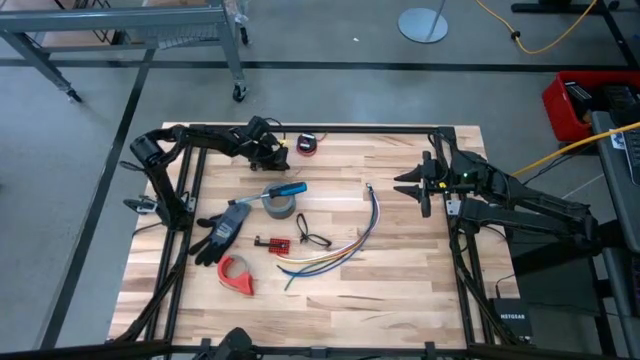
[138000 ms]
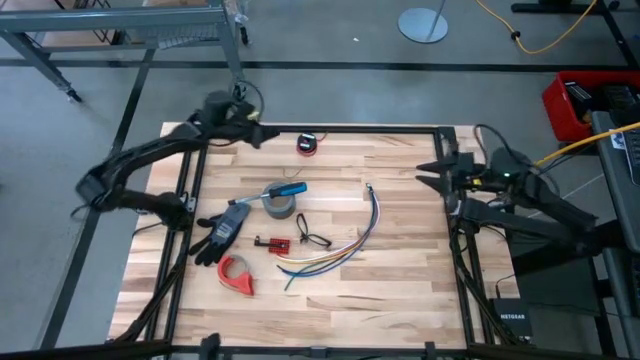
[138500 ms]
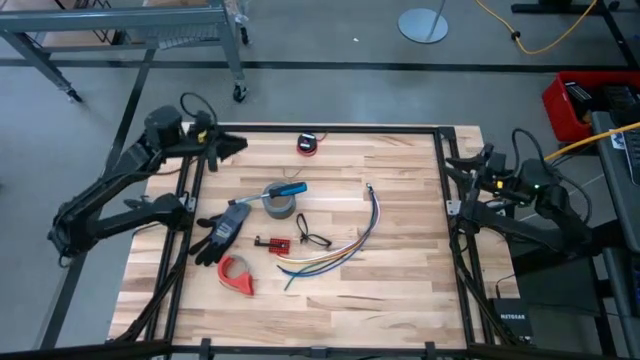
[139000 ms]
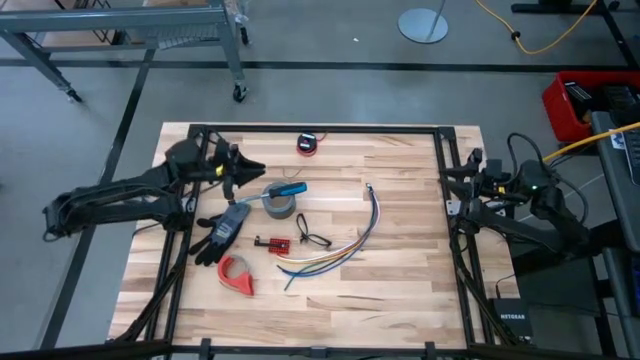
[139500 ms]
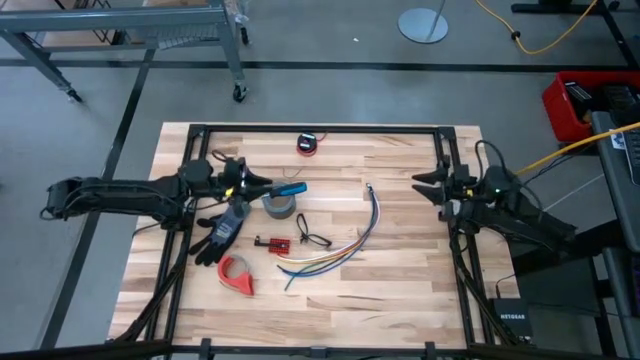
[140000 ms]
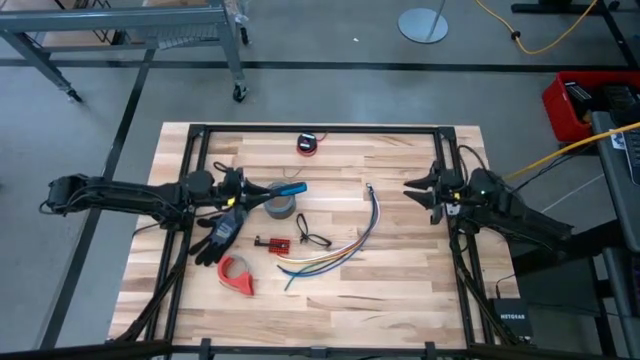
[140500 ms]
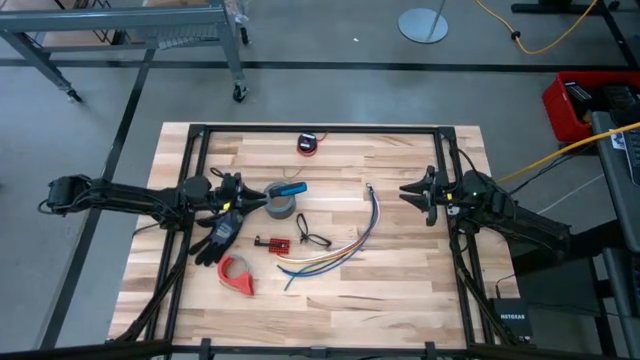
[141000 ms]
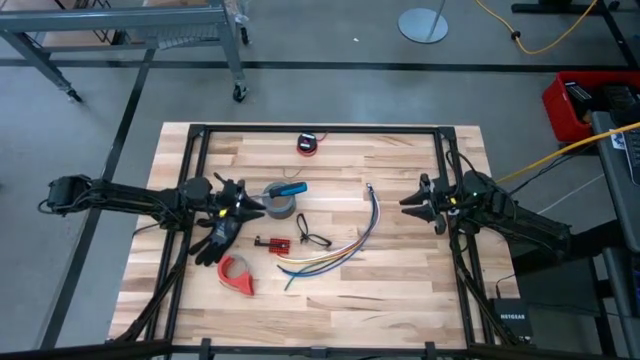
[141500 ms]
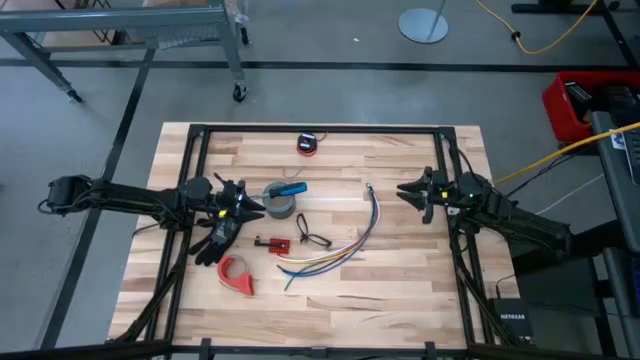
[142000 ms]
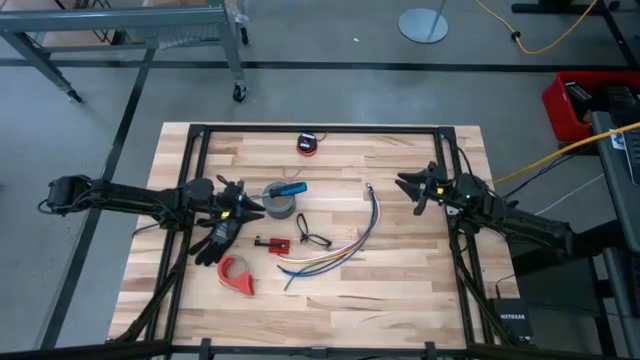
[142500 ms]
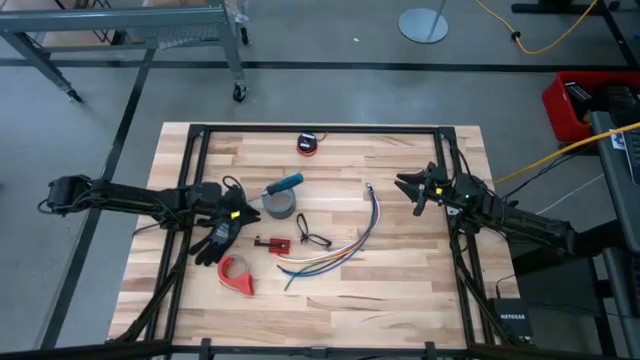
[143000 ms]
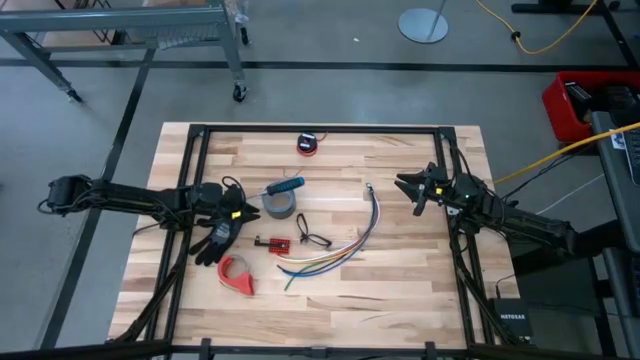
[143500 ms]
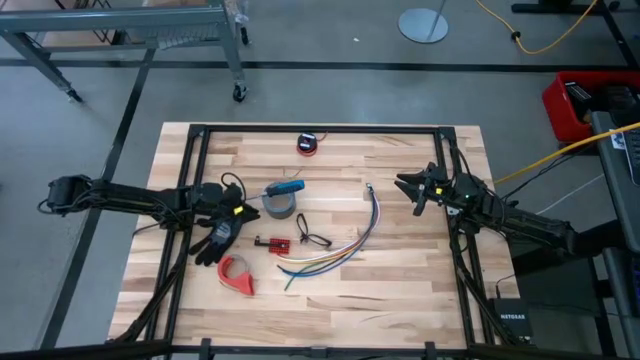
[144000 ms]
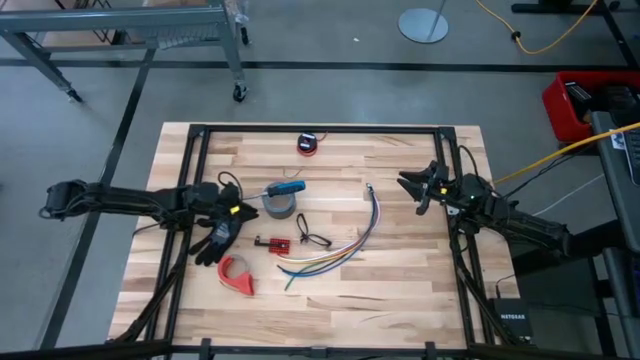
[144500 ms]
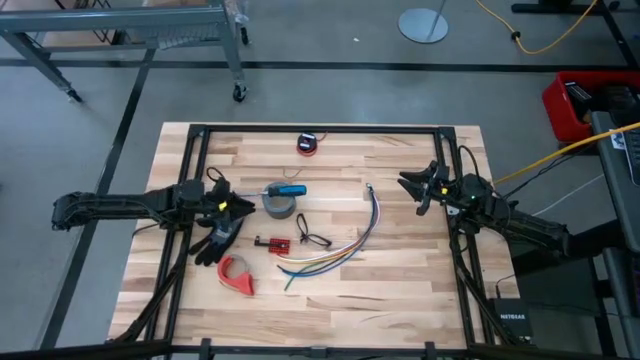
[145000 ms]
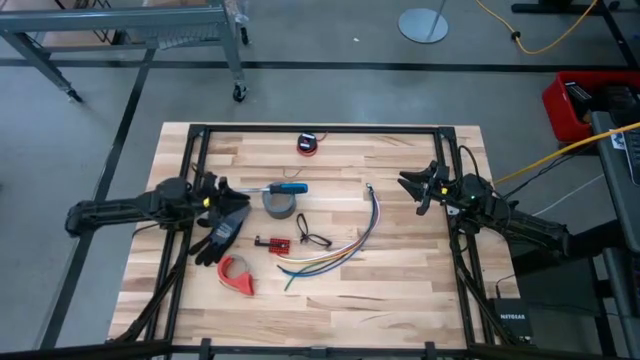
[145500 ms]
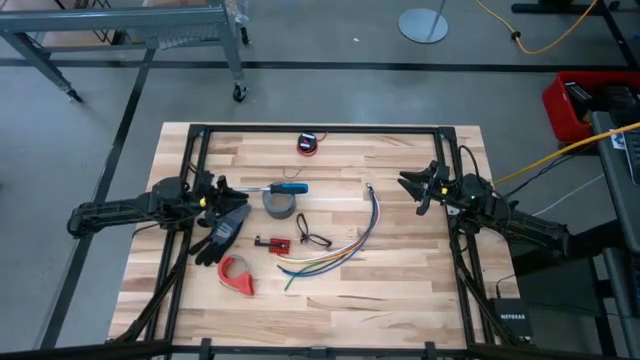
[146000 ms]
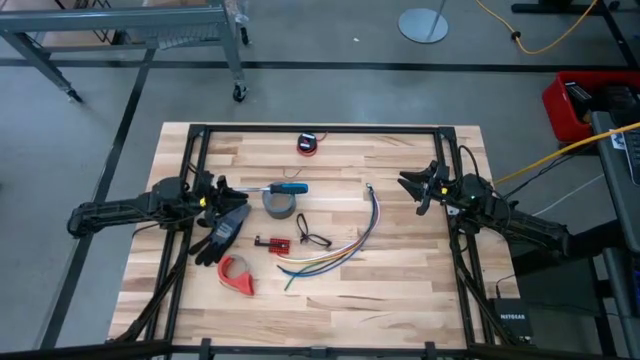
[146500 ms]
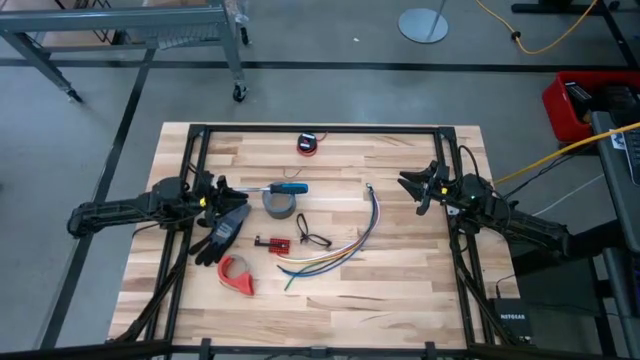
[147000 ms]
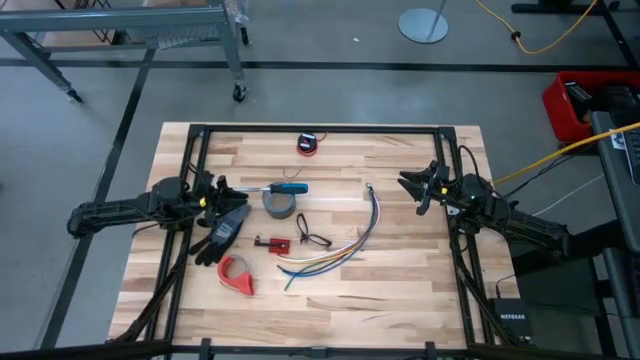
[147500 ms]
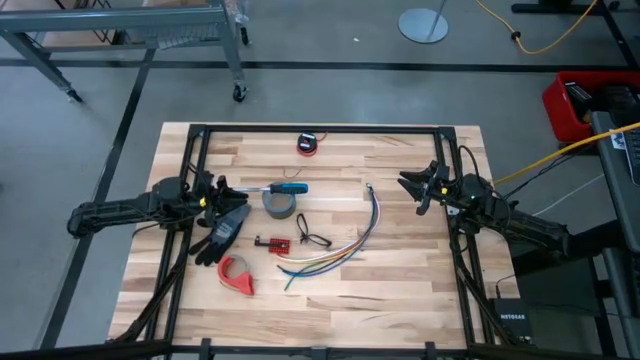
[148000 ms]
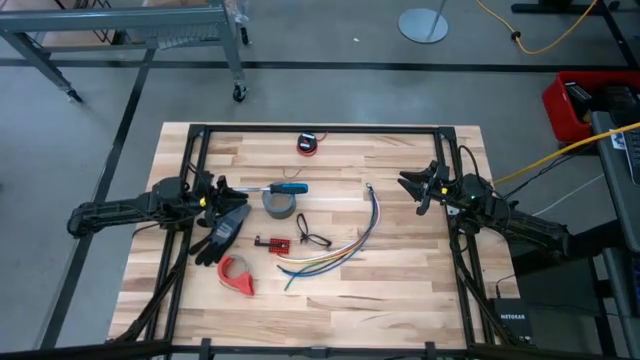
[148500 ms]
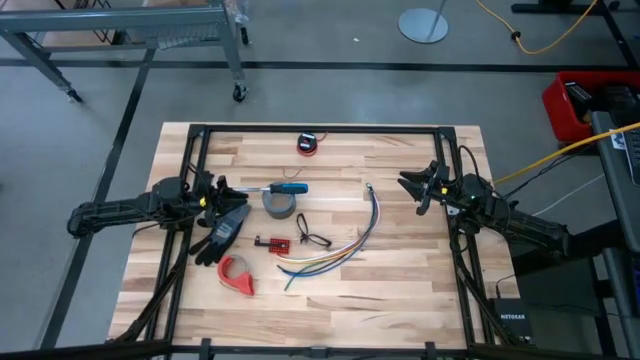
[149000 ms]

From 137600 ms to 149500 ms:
Task: Coil cords
Return to Home Position

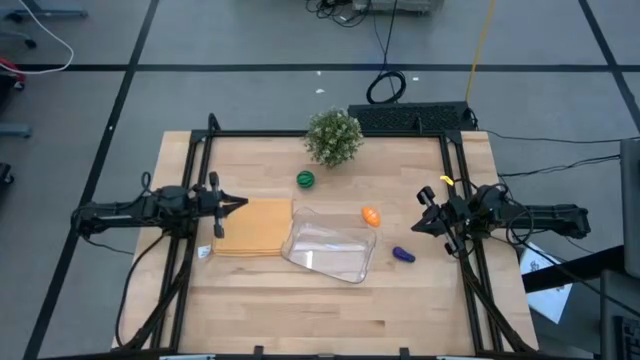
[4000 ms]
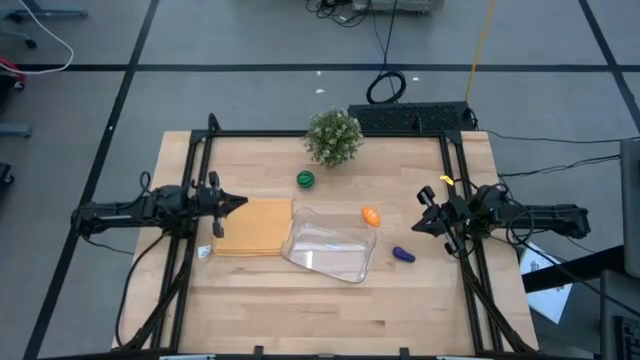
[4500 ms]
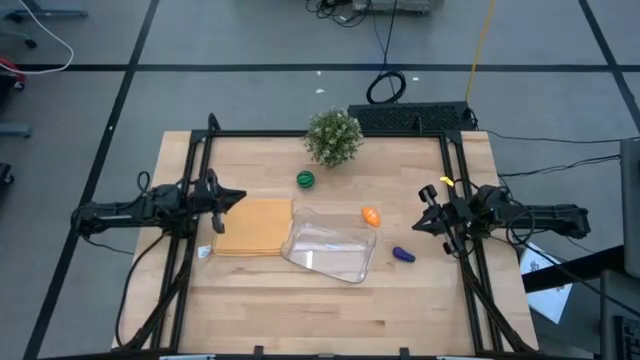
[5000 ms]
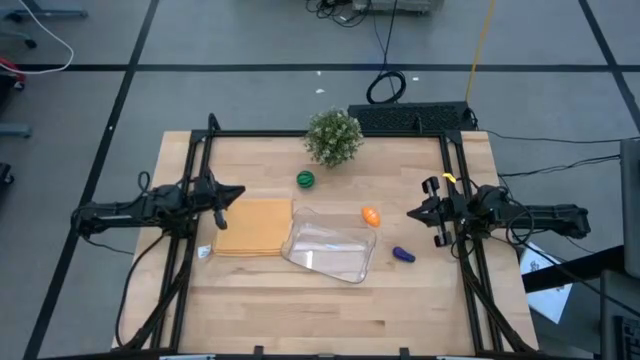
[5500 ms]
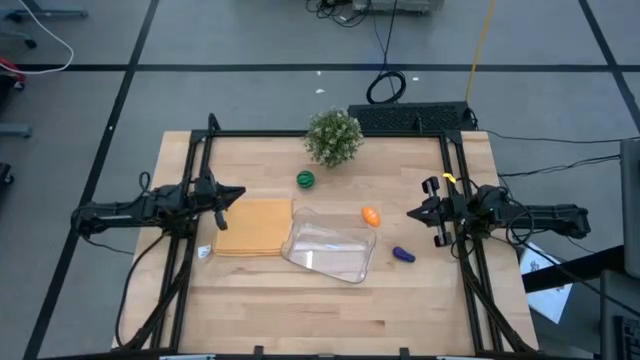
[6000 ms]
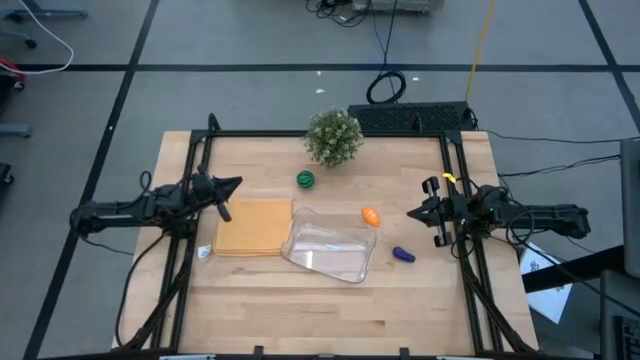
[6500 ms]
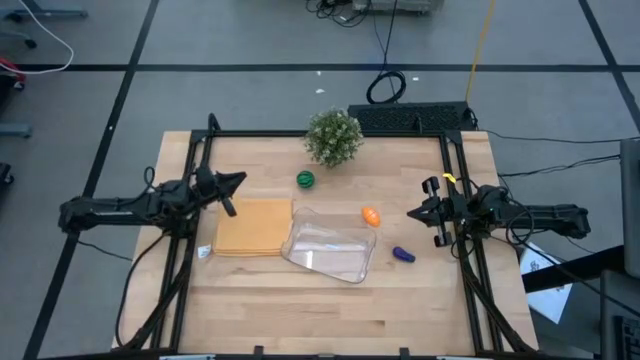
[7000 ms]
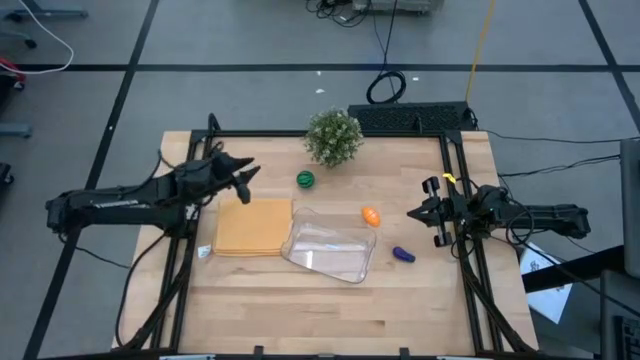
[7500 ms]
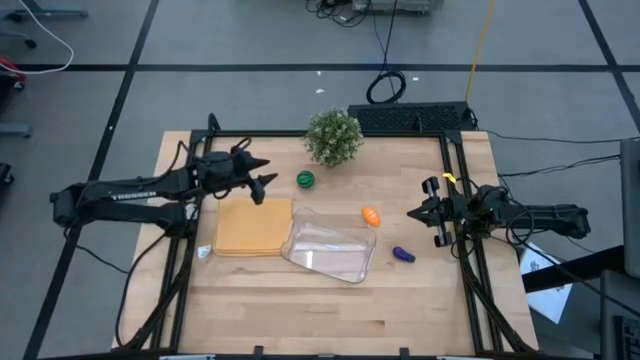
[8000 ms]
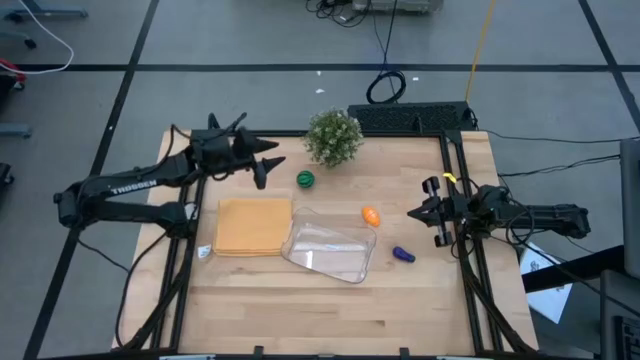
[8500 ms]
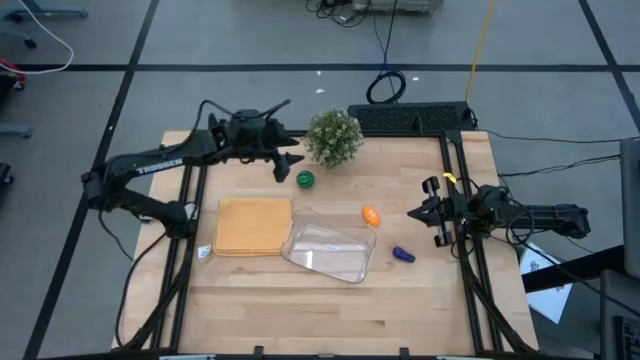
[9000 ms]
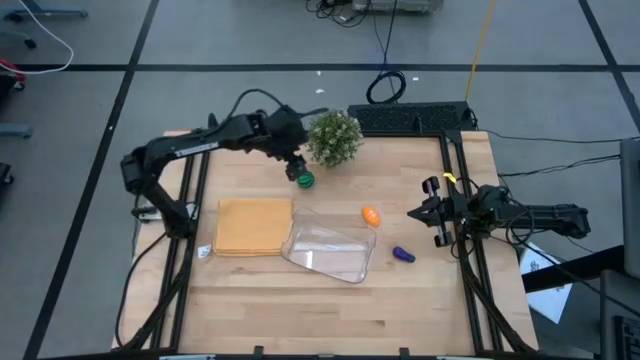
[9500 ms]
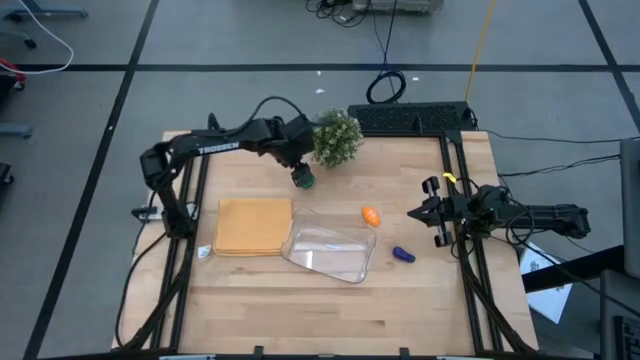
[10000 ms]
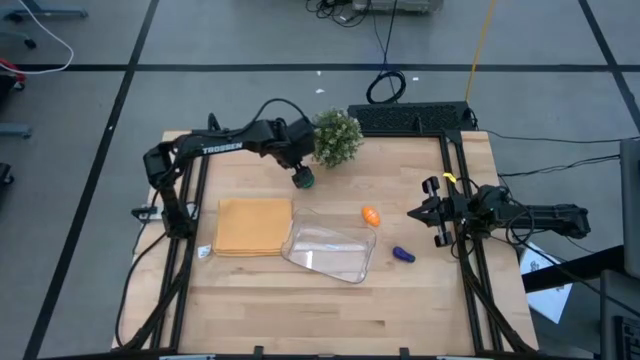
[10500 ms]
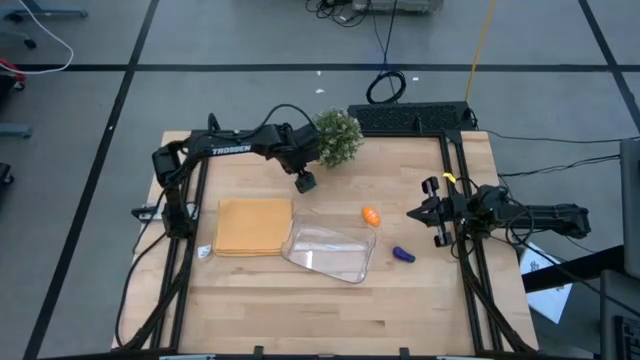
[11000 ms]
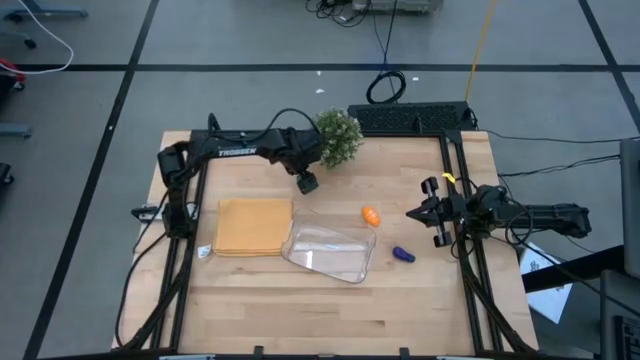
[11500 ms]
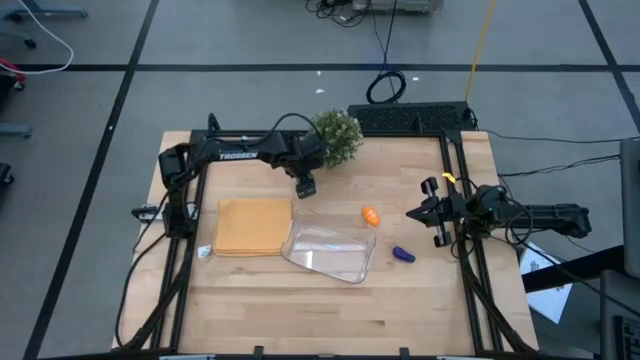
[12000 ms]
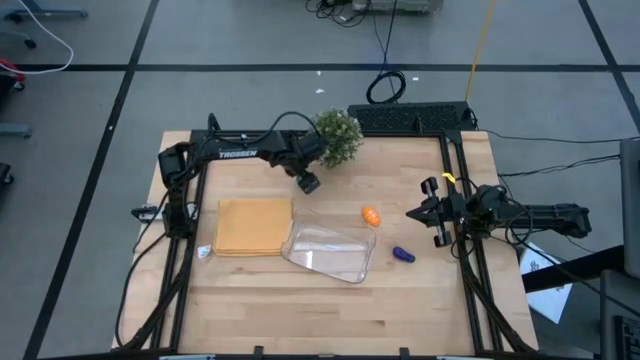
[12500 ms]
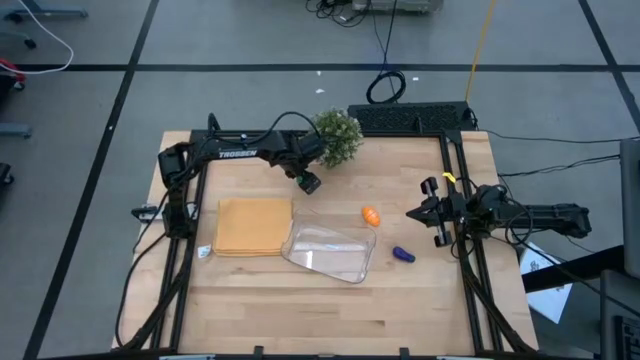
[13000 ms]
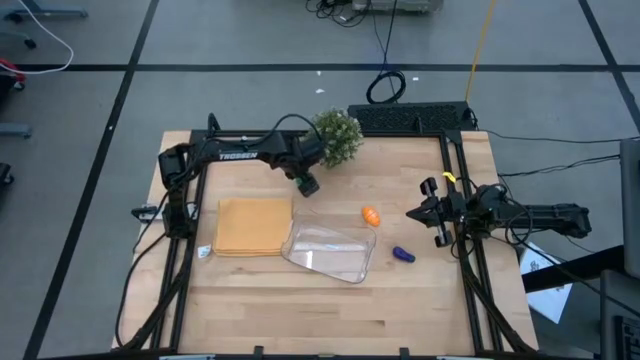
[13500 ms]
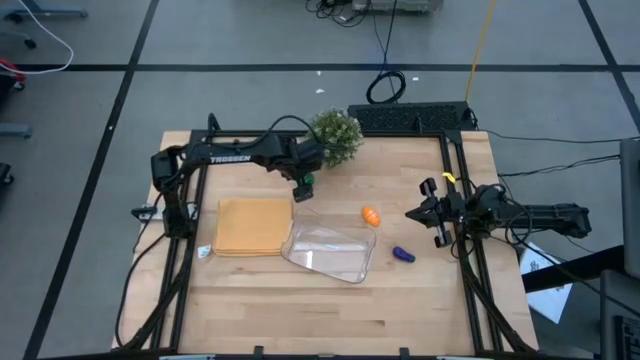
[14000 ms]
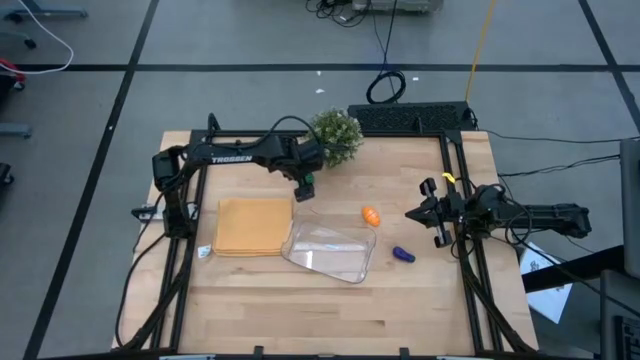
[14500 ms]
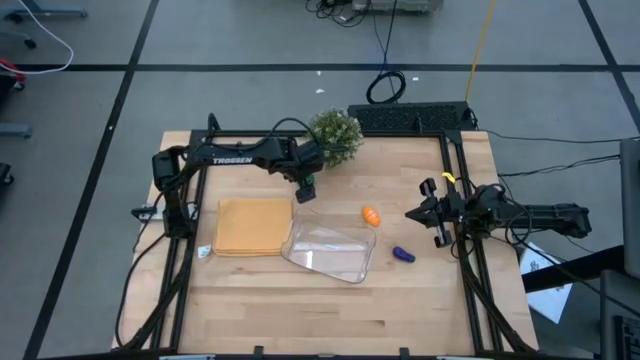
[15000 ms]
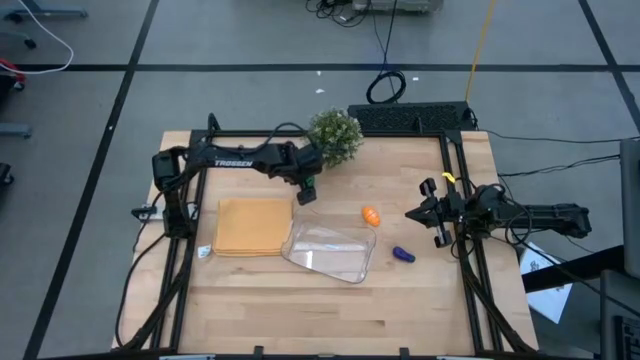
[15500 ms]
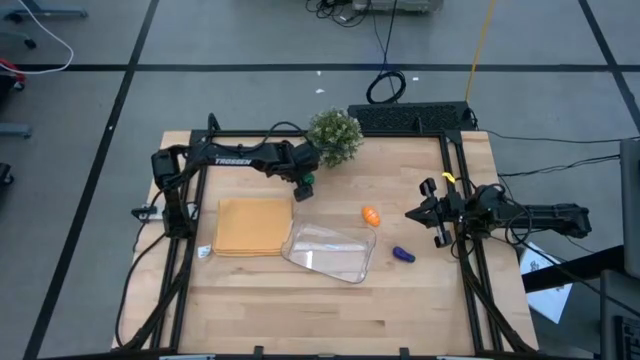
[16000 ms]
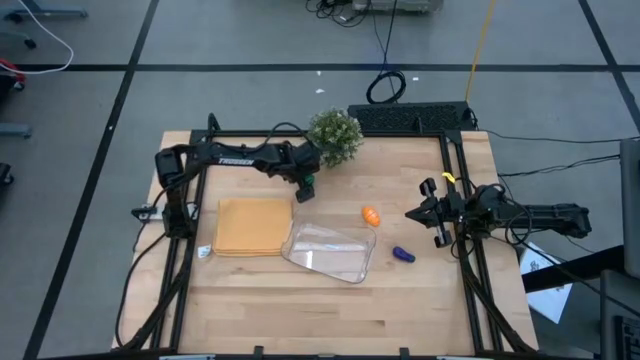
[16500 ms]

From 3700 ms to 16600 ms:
Task: Pick and placing Produce into tupperware
Put the watermelon into the transparent bin
